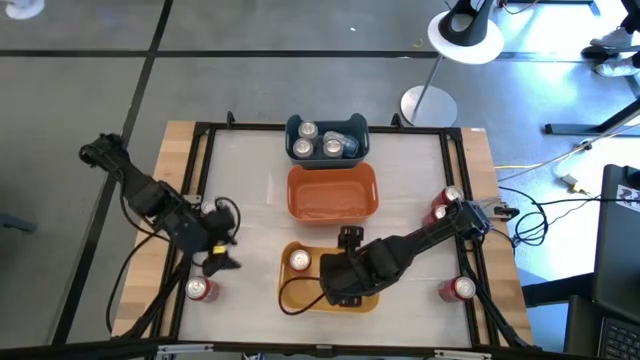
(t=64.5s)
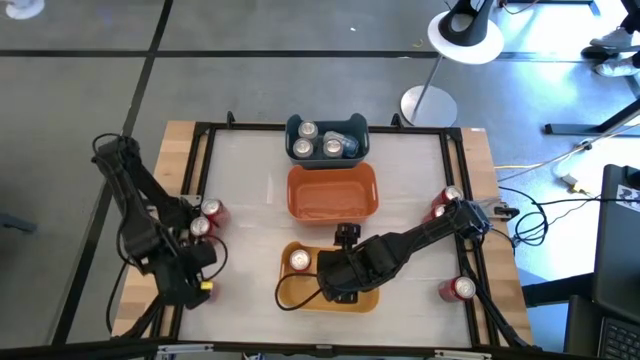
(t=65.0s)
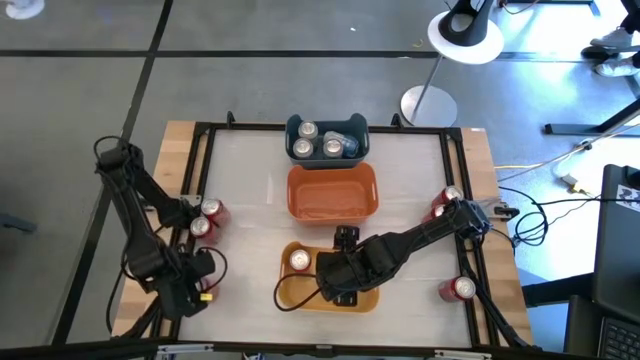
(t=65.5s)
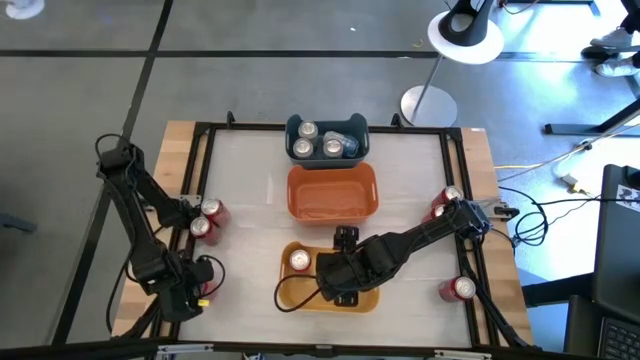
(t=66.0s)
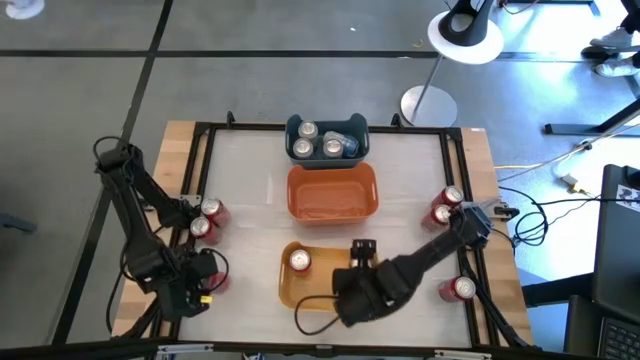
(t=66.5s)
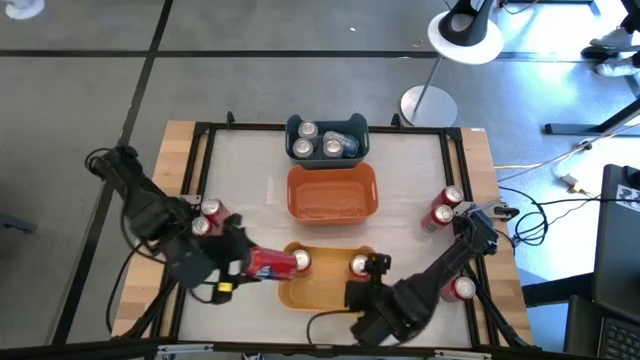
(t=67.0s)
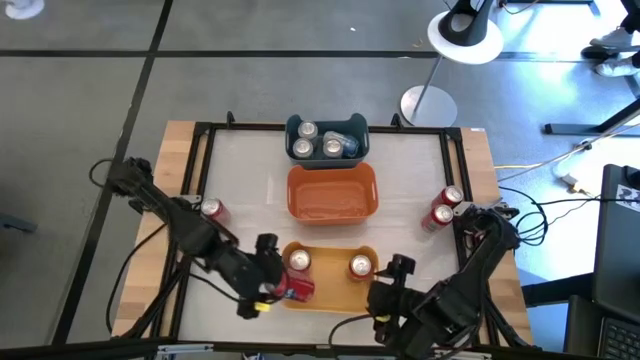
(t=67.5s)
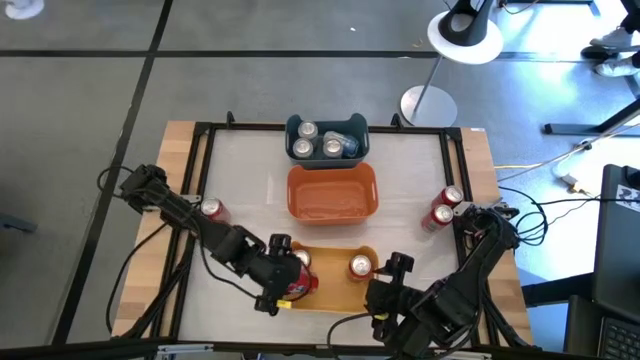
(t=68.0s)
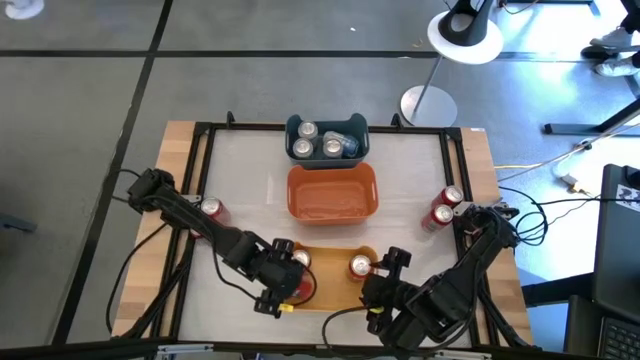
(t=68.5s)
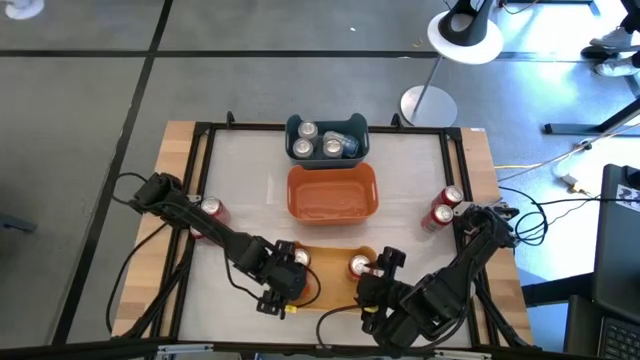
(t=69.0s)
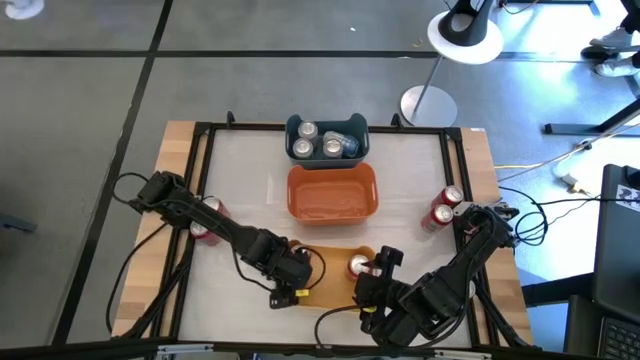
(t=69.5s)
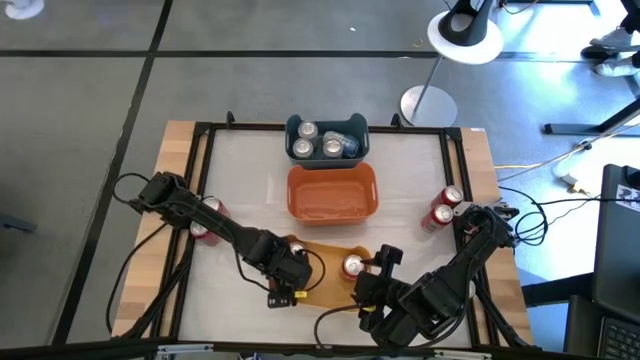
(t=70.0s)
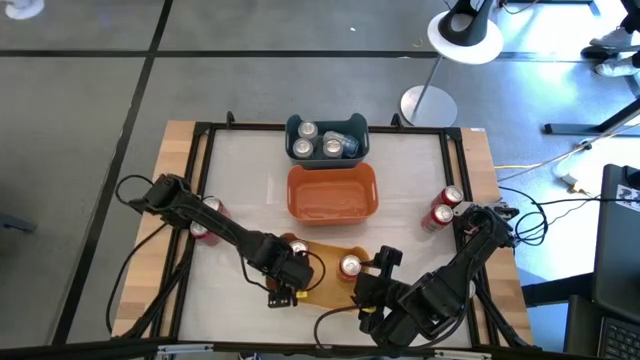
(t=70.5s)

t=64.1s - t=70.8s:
Task: Sort soda cans
Put the bottom orange soda can into the yellow bin

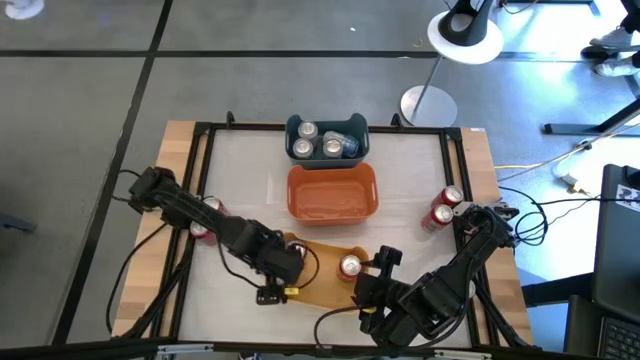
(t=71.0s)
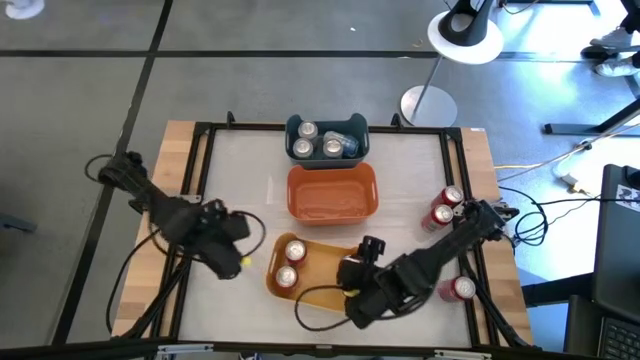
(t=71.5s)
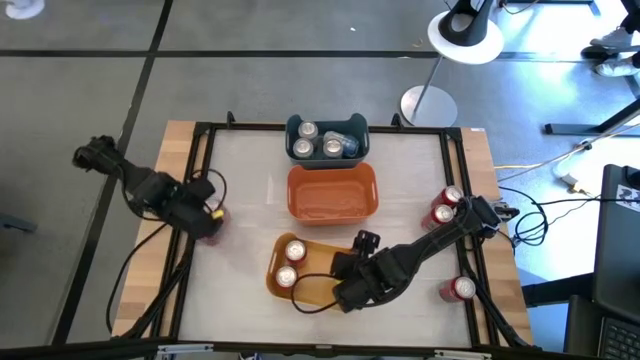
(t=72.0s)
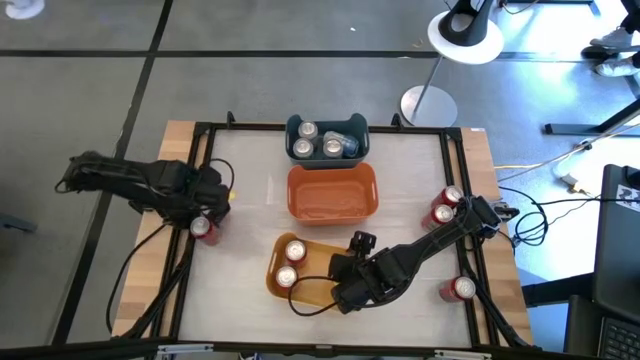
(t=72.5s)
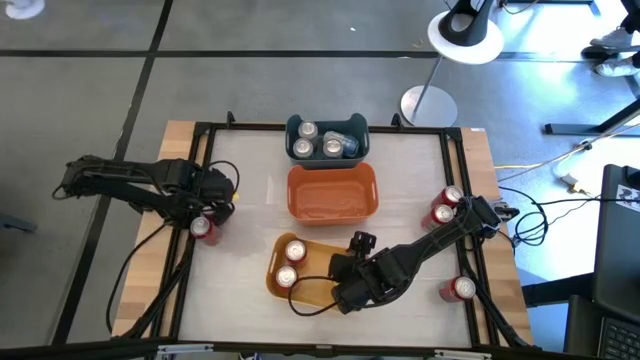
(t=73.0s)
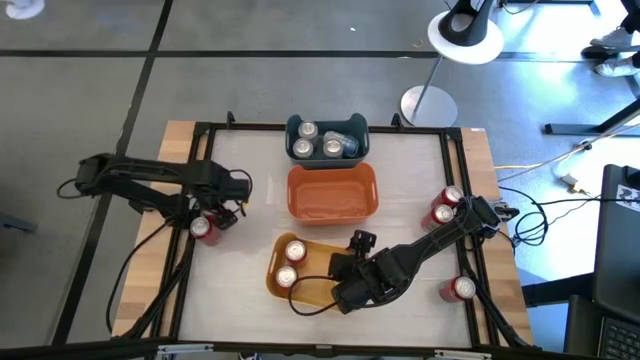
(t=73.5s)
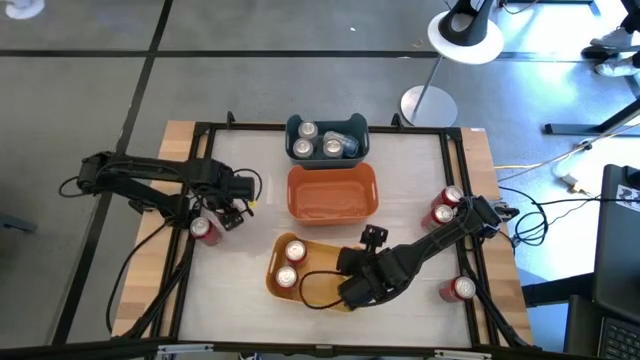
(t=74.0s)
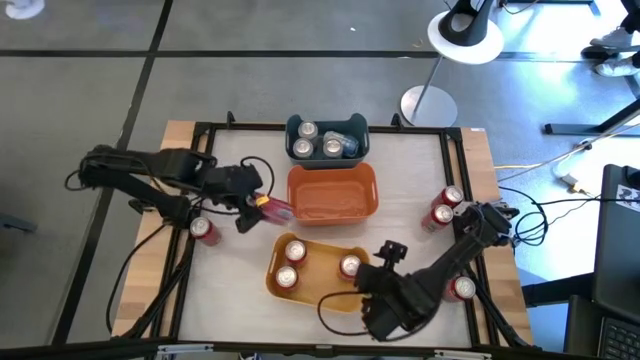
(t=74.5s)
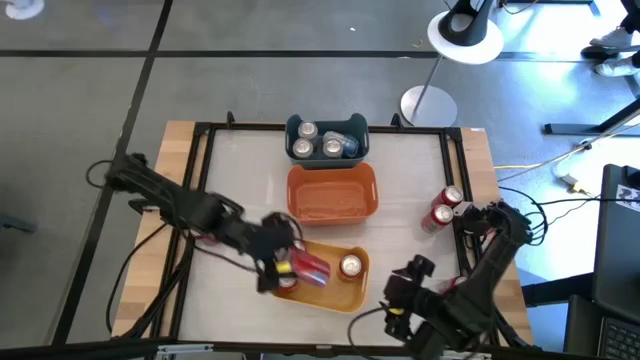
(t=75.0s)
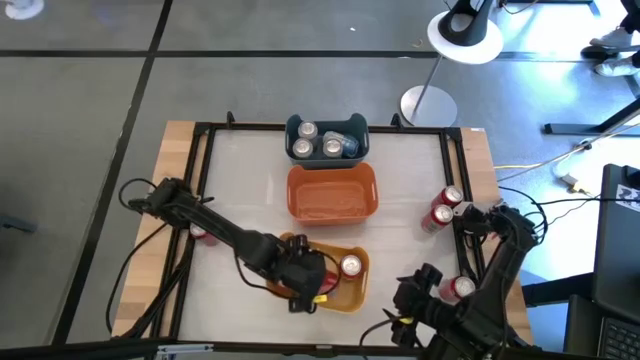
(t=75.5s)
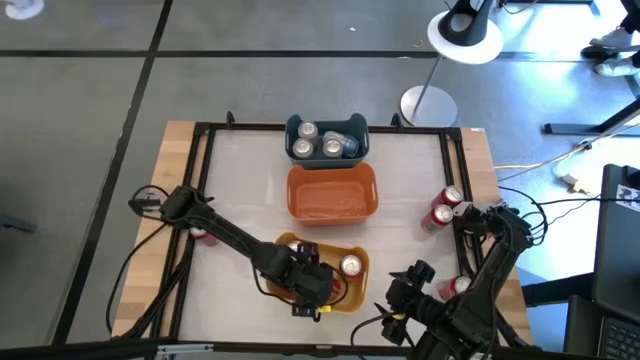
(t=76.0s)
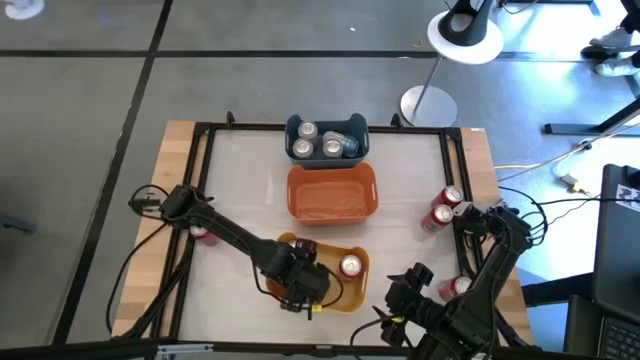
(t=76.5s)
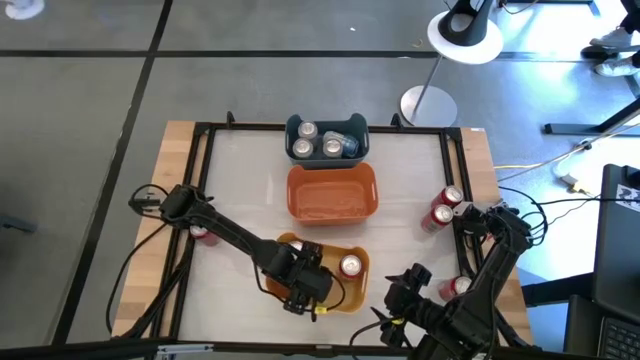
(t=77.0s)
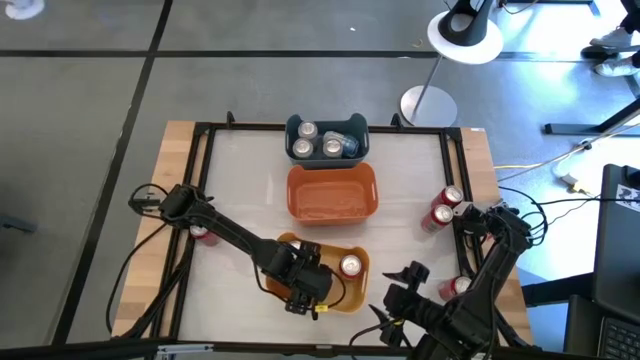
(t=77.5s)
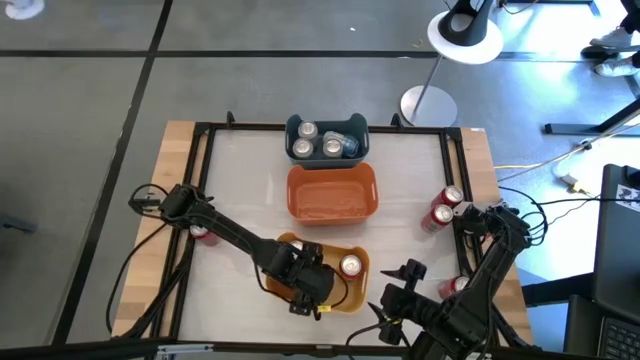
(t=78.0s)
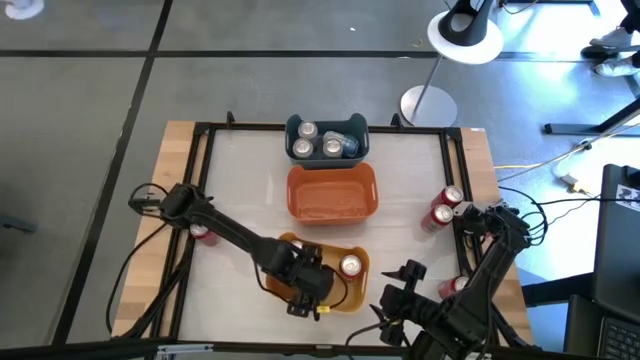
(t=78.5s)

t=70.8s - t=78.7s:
Put the orange soda can into the yellow bin

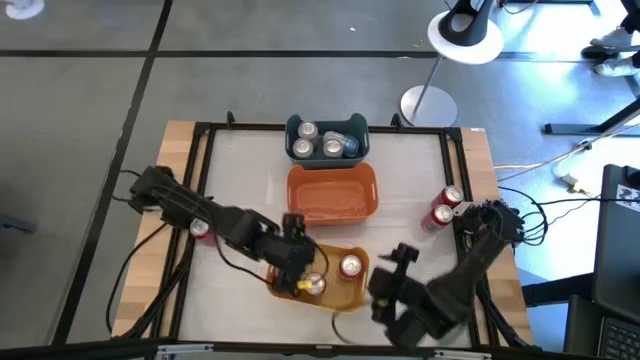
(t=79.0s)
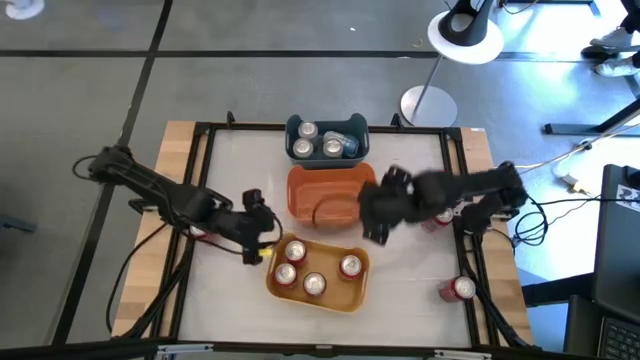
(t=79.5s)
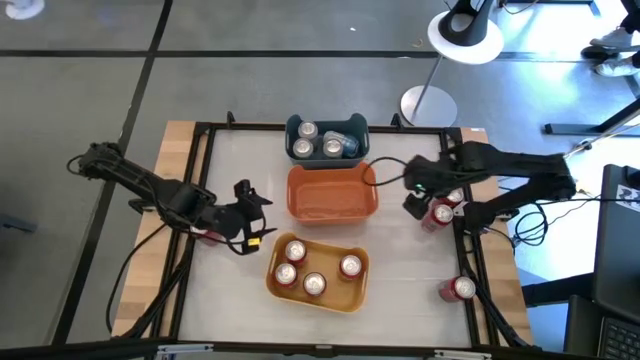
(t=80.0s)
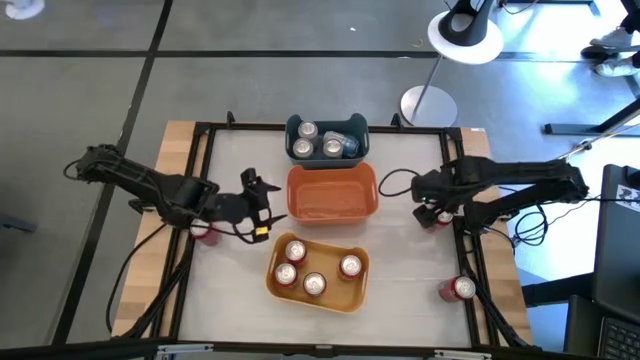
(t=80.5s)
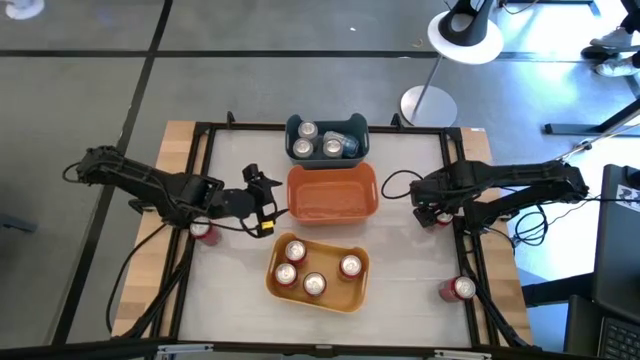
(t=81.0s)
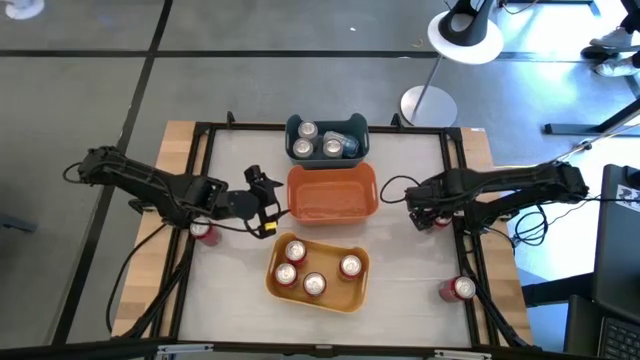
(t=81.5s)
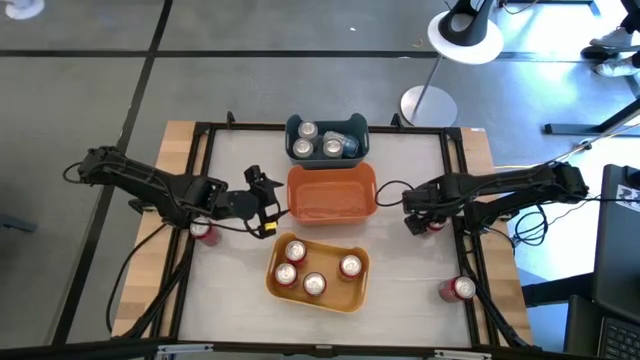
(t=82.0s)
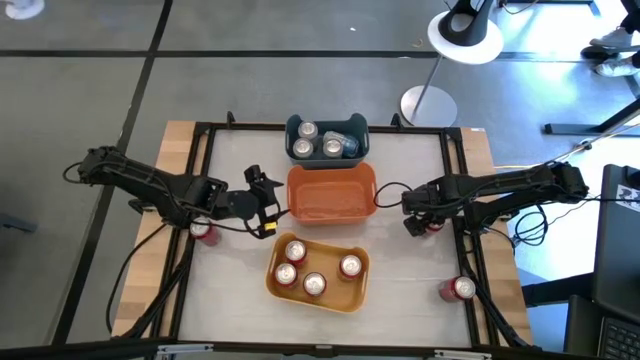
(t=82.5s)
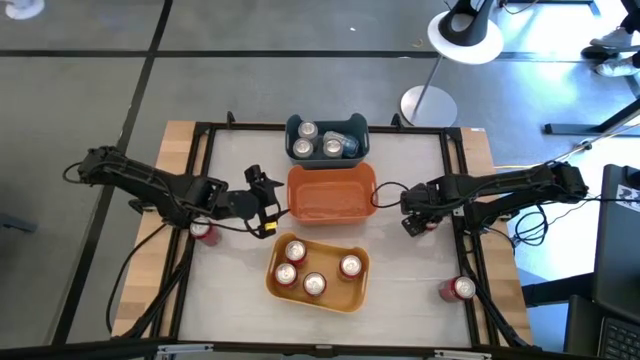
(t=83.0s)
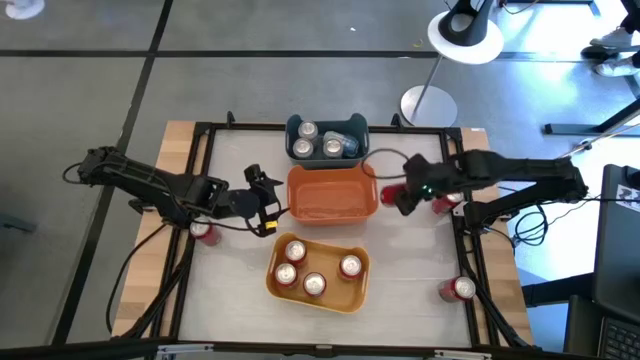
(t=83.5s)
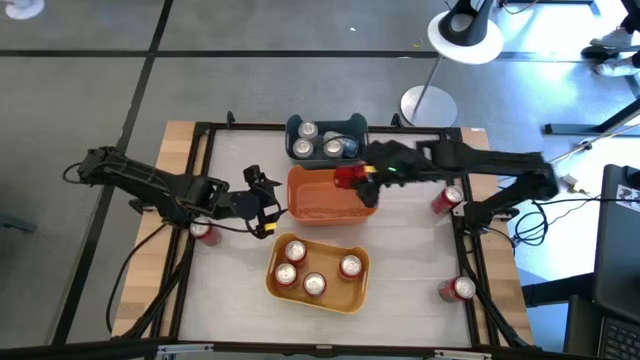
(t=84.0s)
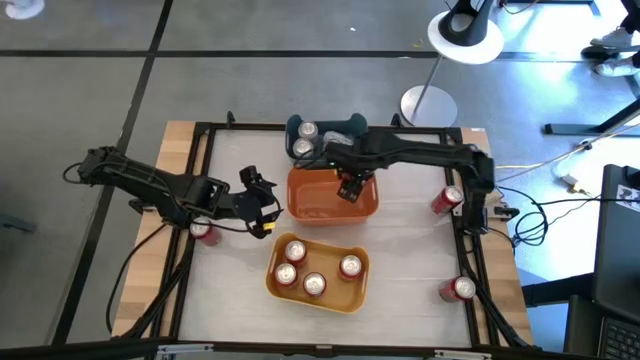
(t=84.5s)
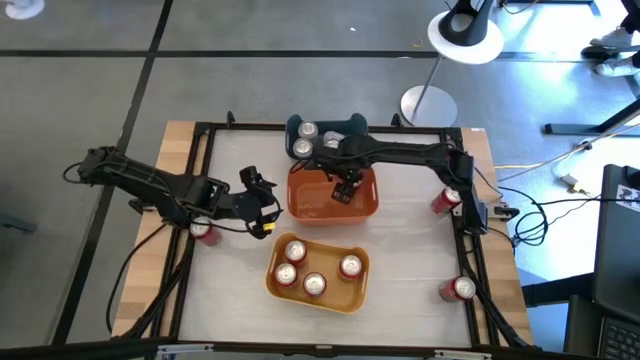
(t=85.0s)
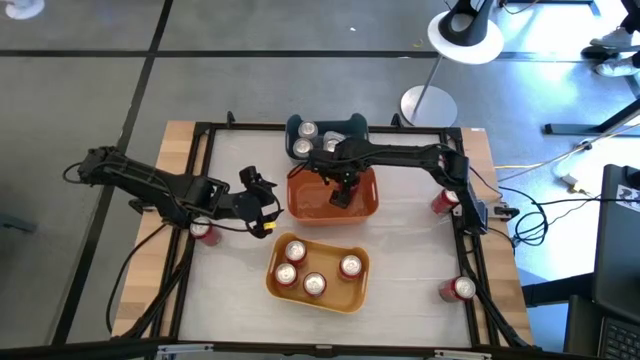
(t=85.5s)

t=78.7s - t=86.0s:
Put the middle right red soda can into the orange bin
